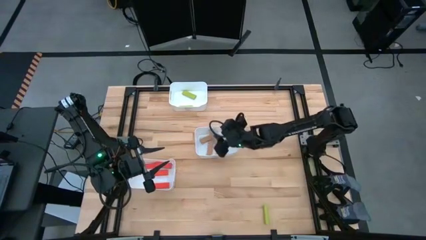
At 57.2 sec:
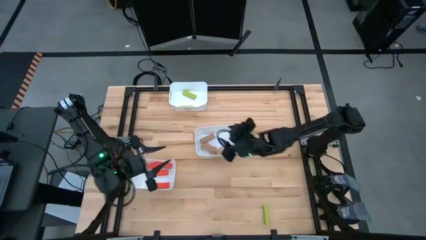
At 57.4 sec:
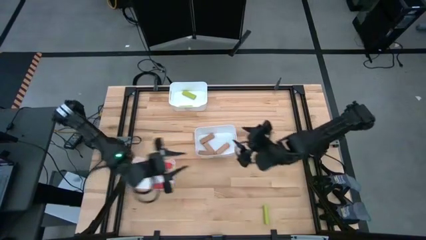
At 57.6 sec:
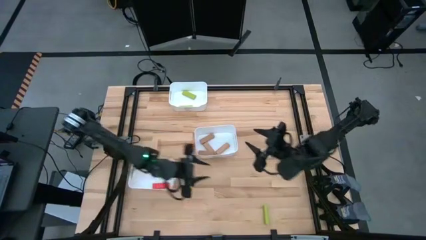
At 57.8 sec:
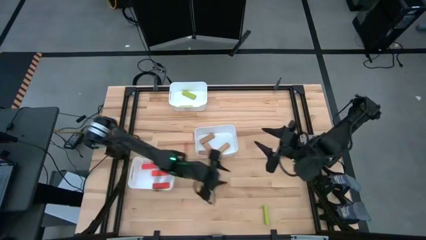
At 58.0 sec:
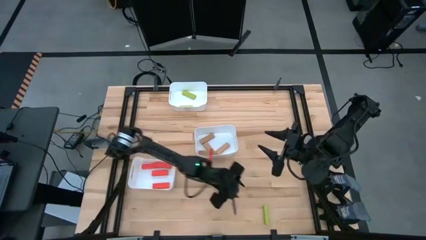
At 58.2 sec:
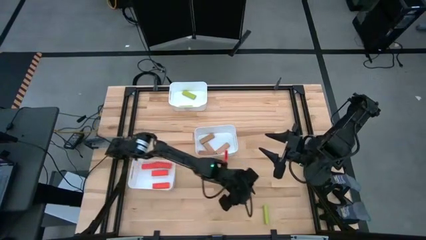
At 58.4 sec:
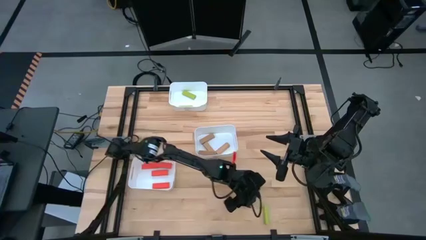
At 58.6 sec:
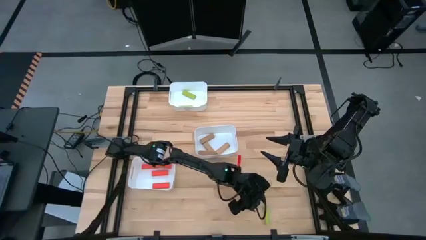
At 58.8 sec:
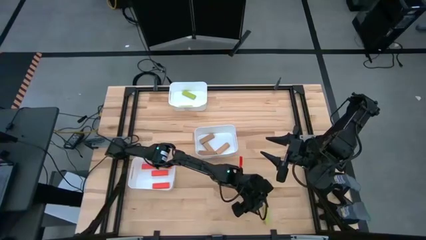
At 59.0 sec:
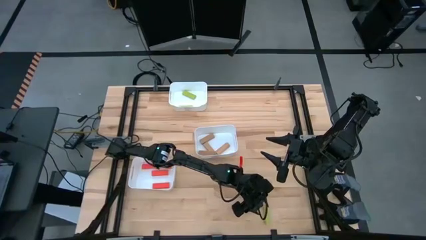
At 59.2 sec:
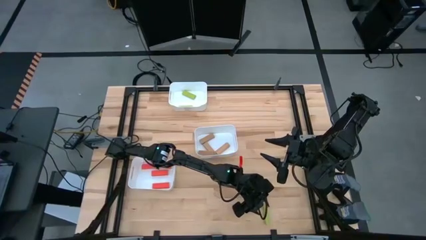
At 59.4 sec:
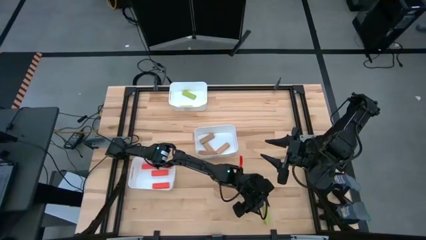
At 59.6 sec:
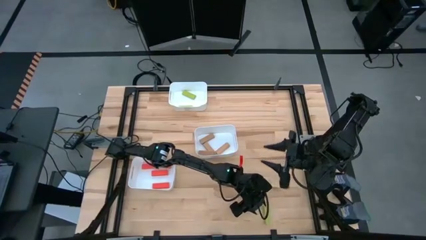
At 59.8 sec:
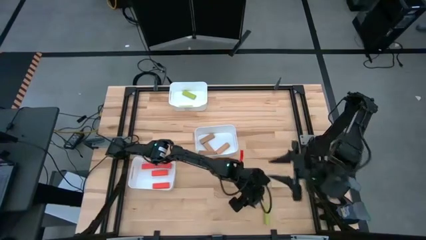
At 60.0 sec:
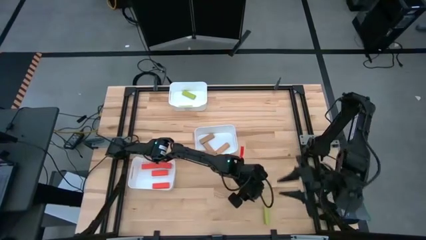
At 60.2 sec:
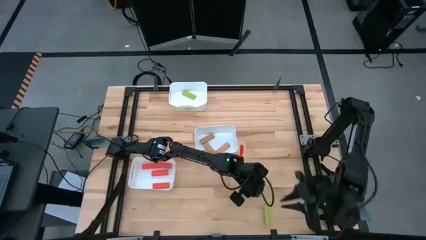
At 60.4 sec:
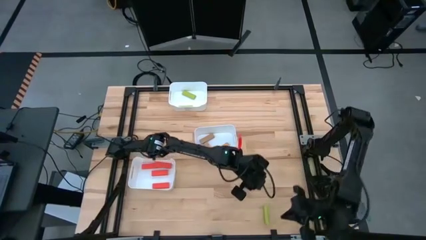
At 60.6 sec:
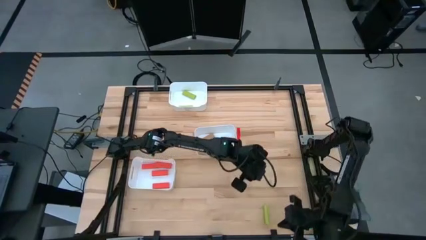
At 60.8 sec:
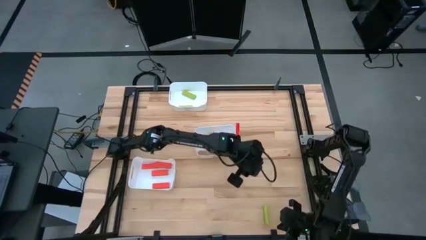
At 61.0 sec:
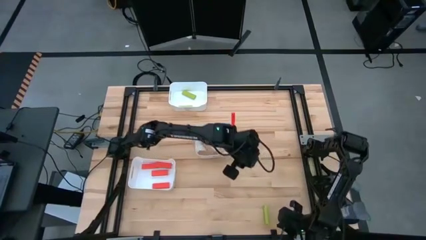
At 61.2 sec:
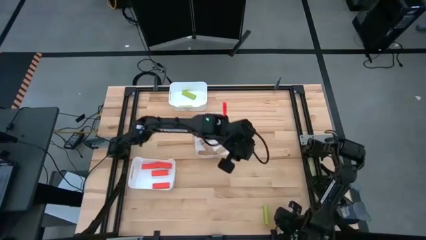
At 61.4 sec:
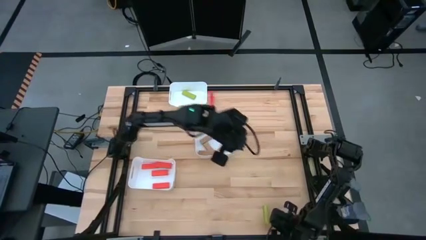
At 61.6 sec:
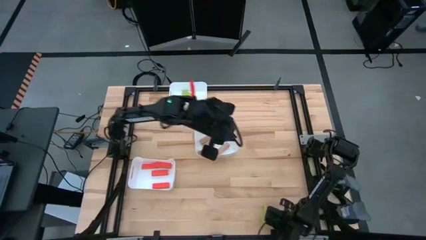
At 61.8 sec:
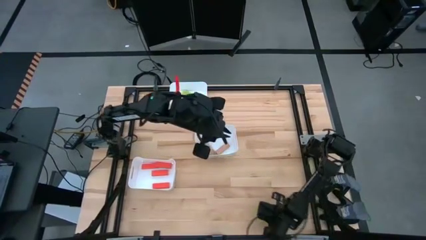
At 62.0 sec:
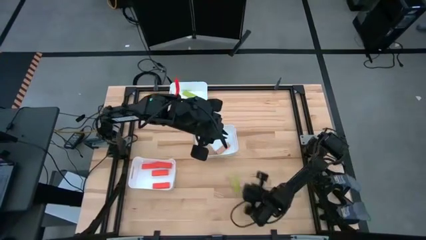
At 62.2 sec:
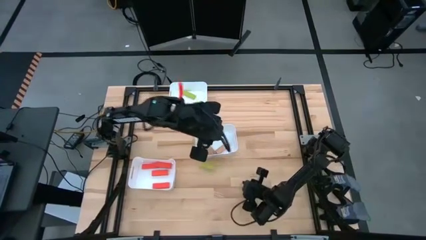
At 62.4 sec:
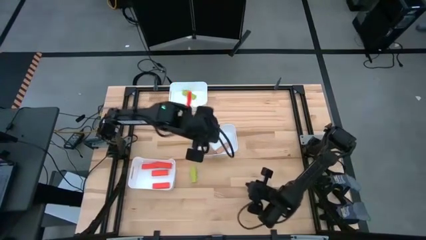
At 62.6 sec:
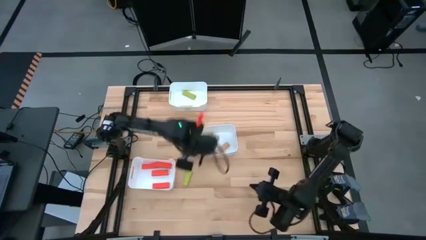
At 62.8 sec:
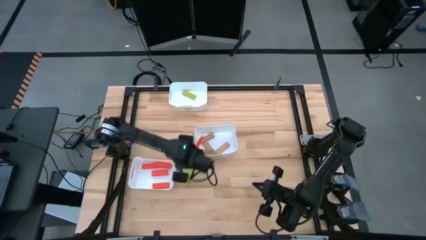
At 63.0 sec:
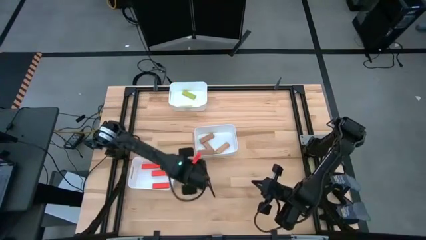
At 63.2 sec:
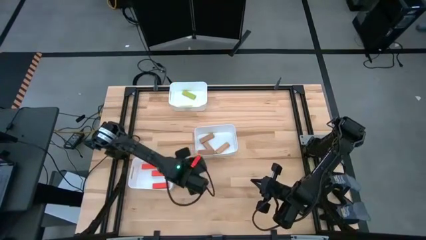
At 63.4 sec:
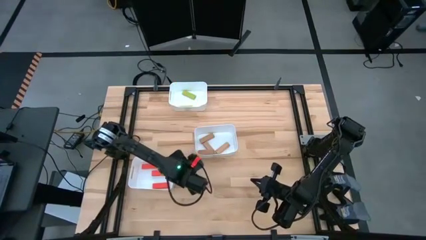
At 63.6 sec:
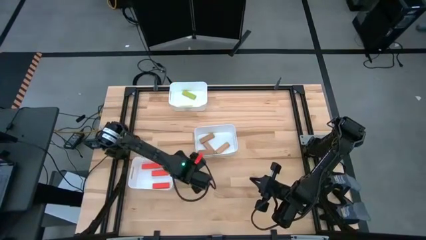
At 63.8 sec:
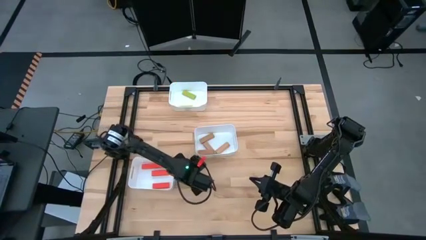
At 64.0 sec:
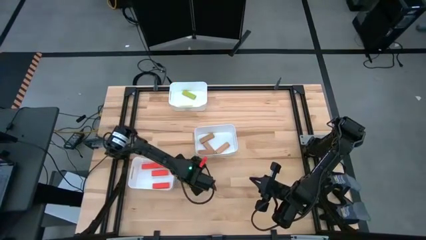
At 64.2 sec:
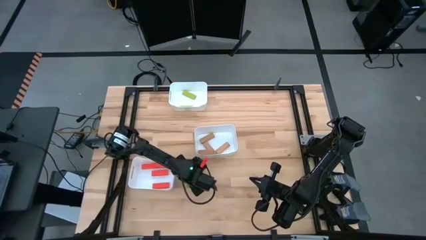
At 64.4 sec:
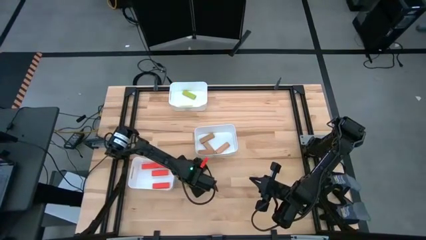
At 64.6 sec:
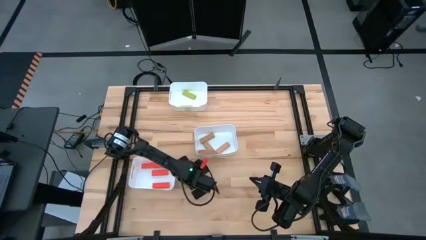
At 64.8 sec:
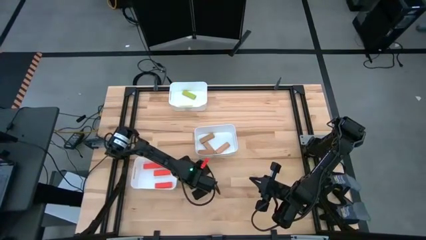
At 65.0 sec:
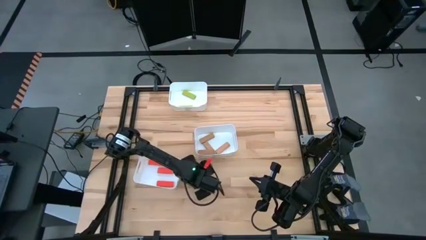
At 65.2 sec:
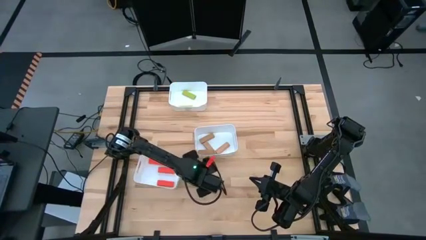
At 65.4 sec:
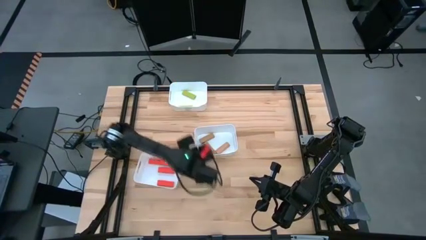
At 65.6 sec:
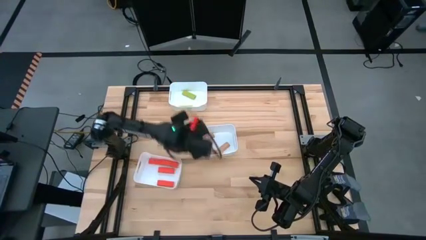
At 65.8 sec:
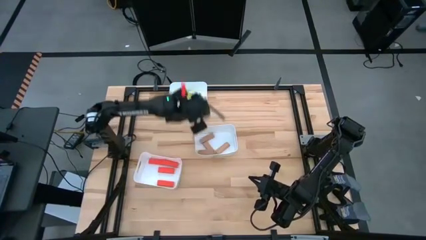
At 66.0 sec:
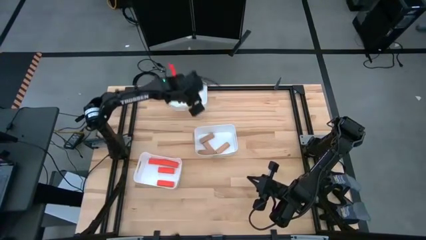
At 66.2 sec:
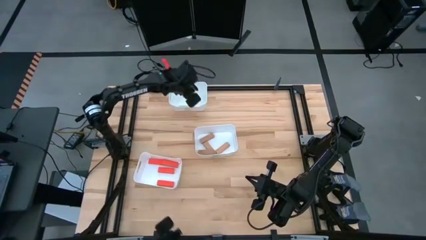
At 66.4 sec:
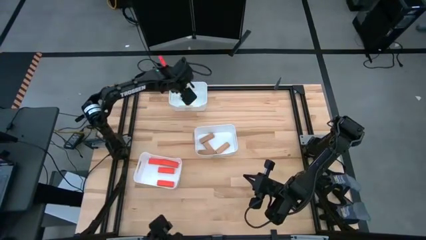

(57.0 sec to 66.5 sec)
Task: Sort blocks
Put the green block into the top white bin

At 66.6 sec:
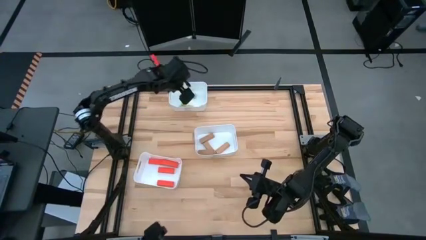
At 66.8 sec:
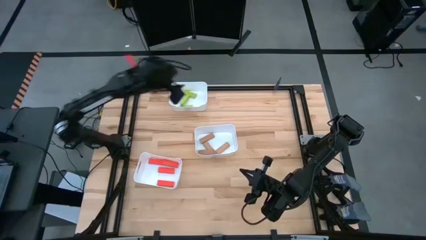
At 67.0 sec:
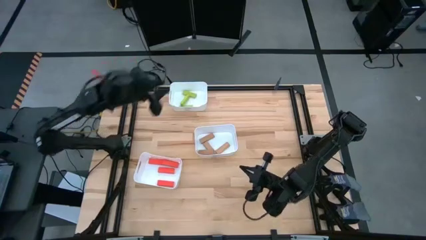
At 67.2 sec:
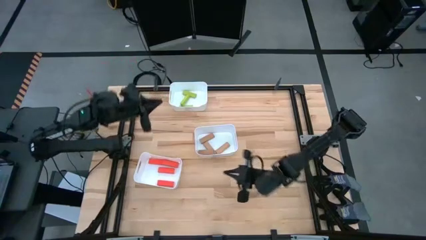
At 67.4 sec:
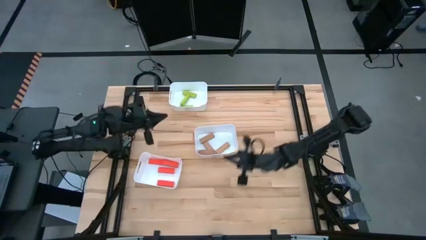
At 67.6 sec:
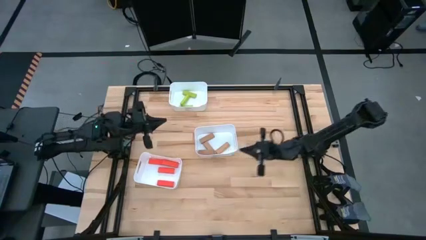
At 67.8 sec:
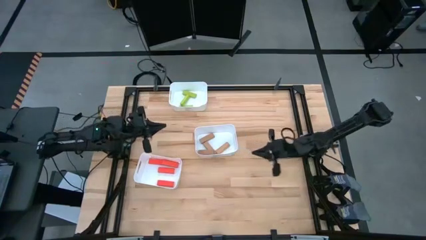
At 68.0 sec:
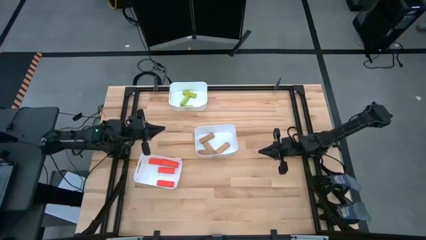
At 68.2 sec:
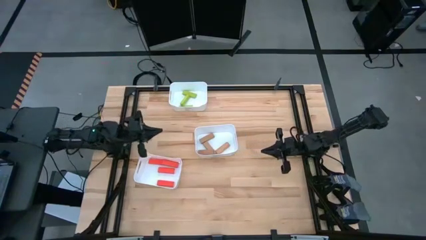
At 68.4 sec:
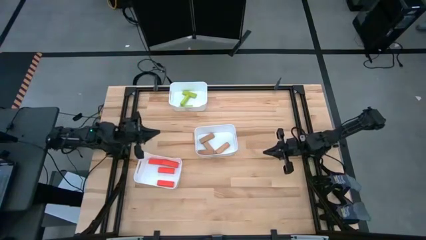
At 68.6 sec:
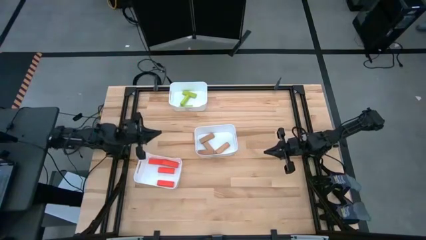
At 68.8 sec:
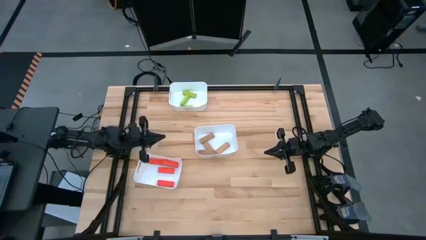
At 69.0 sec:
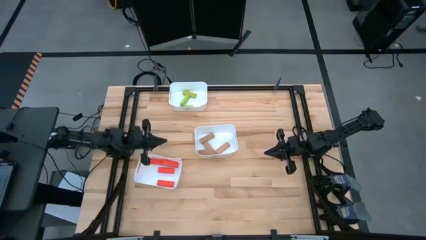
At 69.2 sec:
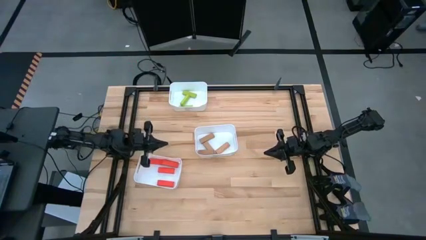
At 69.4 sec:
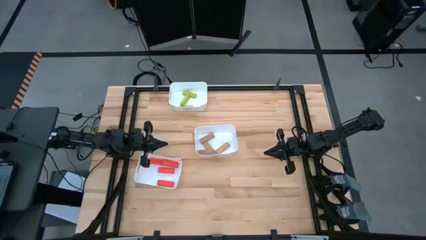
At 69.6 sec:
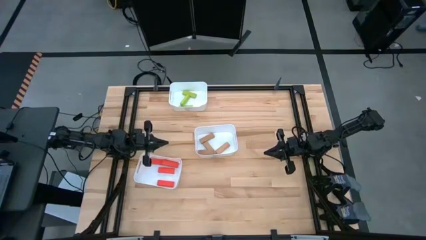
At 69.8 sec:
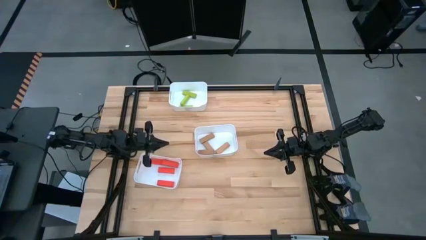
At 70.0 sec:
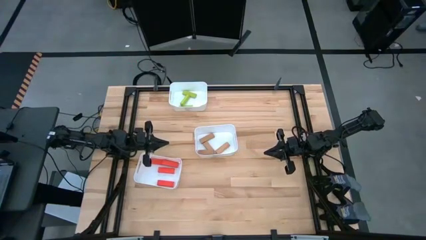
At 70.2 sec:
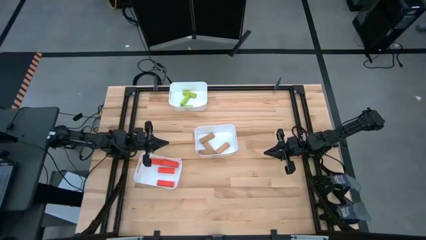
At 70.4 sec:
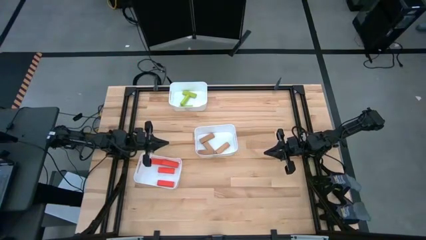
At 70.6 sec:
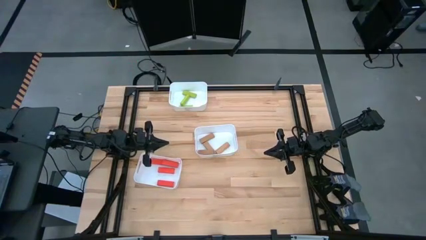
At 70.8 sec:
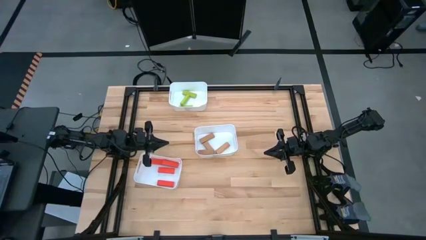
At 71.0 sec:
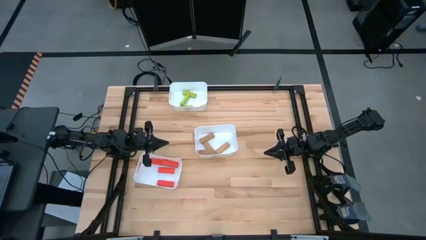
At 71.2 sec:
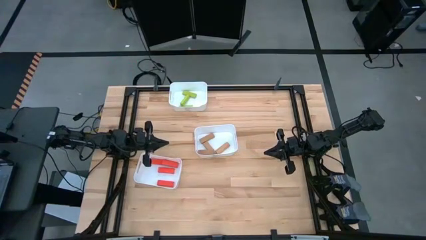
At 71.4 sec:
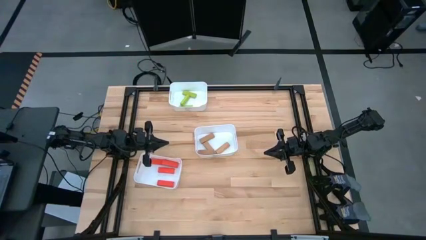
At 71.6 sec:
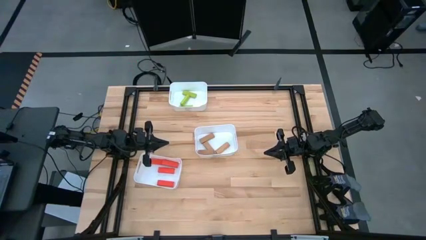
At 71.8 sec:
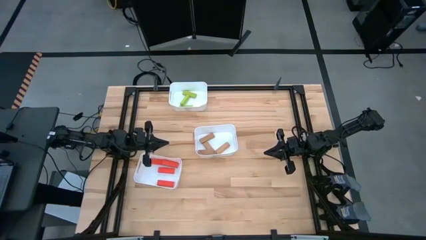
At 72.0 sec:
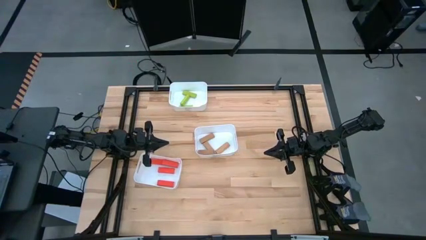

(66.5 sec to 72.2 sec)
Return to Home Position

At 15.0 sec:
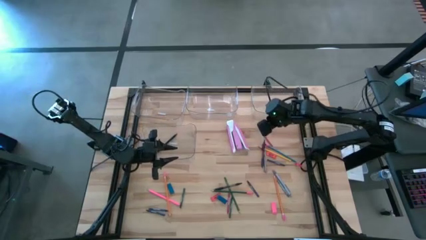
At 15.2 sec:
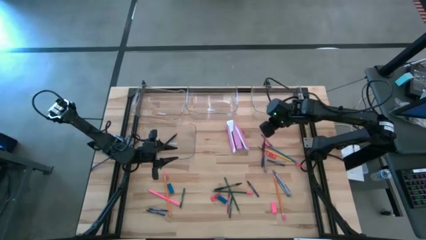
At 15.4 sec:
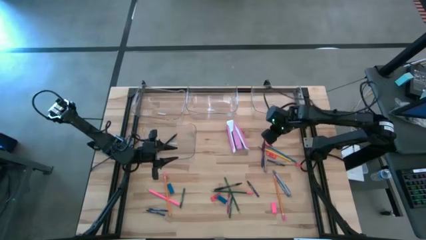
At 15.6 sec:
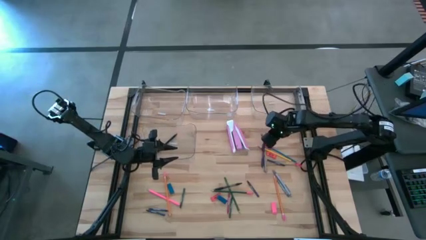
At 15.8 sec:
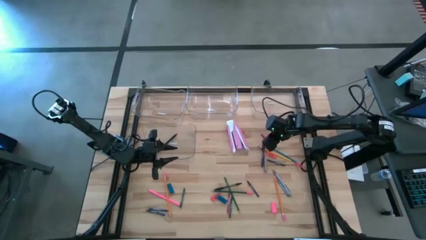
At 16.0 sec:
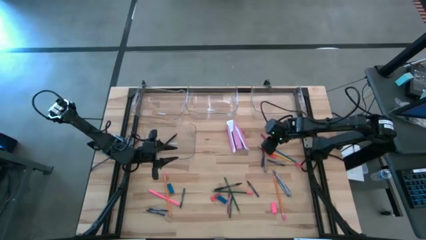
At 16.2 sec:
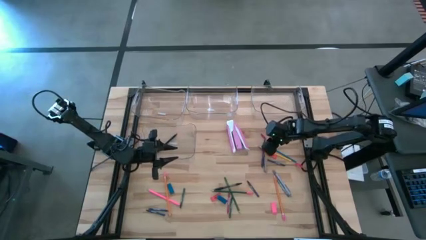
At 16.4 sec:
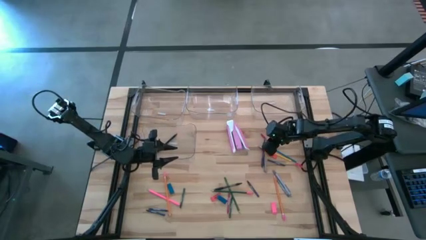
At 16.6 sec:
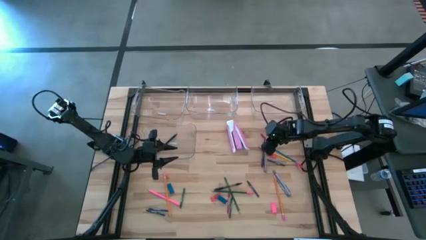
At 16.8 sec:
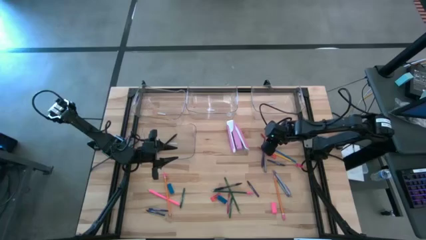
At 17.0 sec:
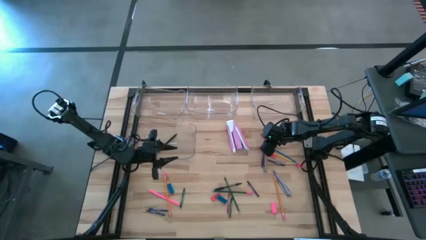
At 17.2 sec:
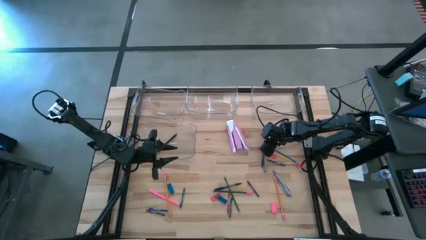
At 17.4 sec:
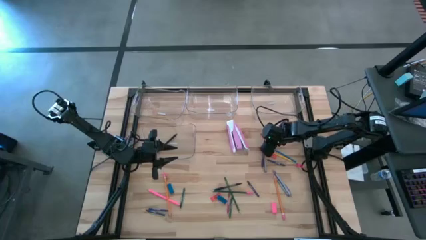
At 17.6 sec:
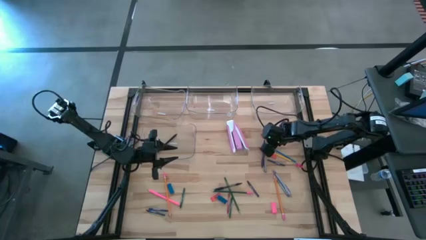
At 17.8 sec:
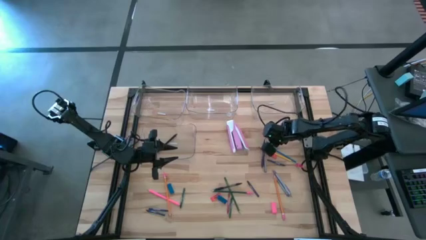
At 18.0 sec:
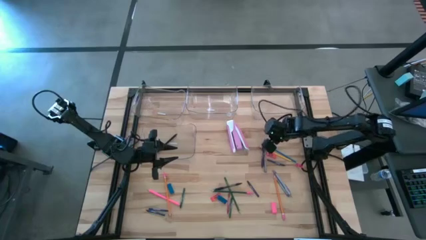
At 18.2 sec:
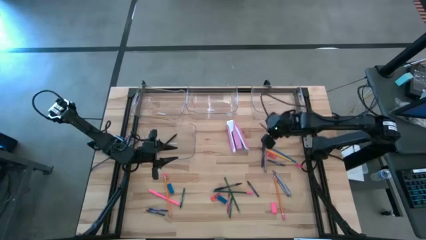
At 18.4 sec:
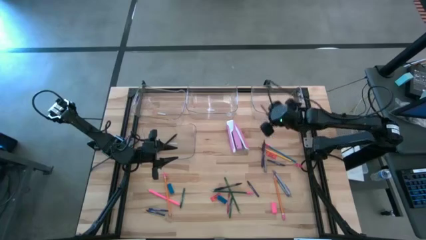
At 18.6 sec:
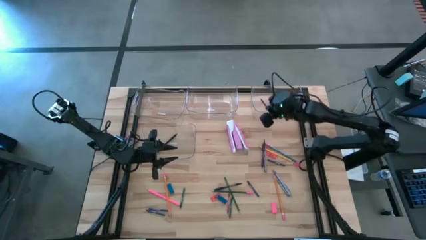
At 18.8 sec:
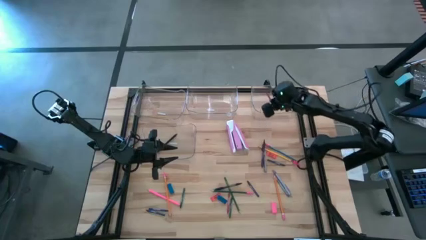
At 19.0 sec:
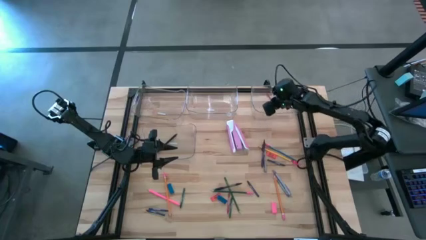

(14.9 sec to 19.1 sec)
Task: Sort crayons/erasers/pens/pencils in bins
Put the red crayon into the top right transparent bin
